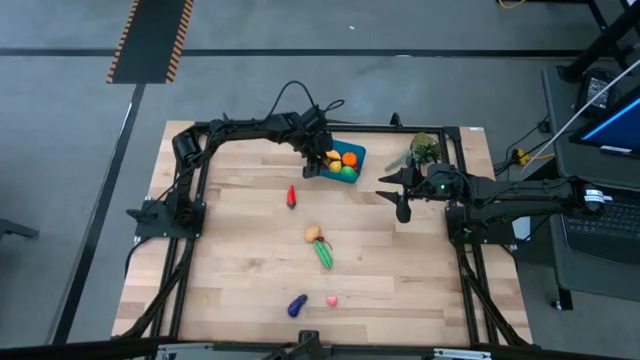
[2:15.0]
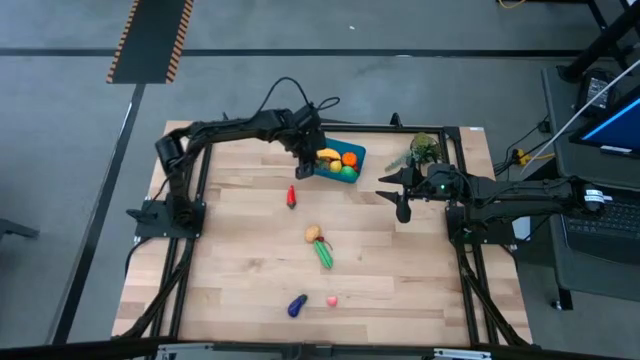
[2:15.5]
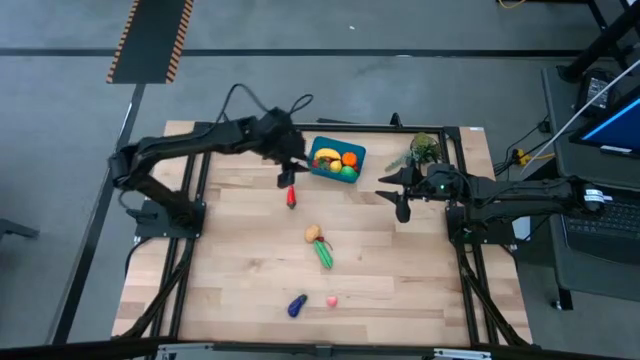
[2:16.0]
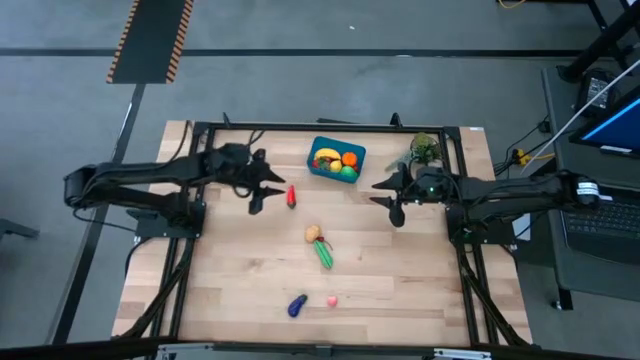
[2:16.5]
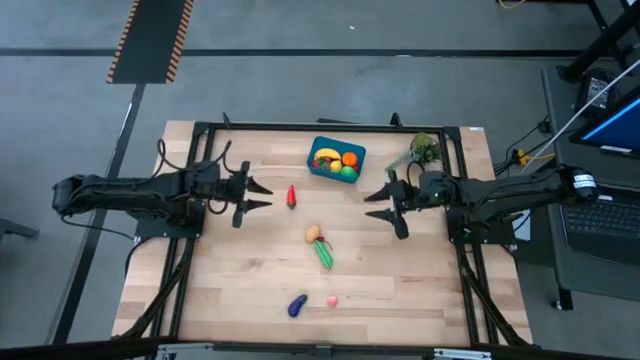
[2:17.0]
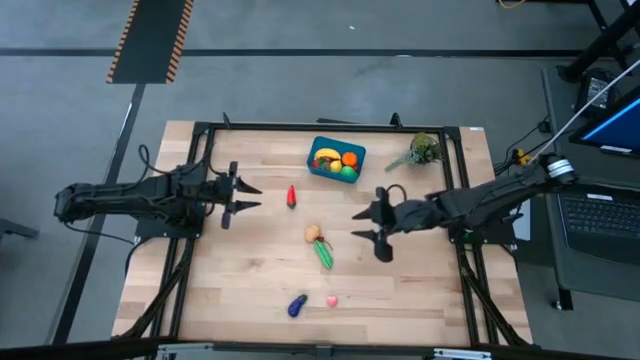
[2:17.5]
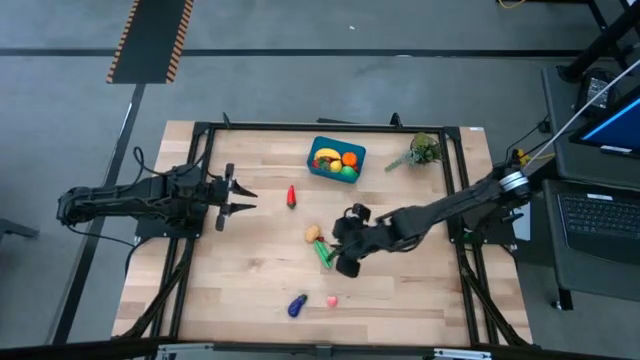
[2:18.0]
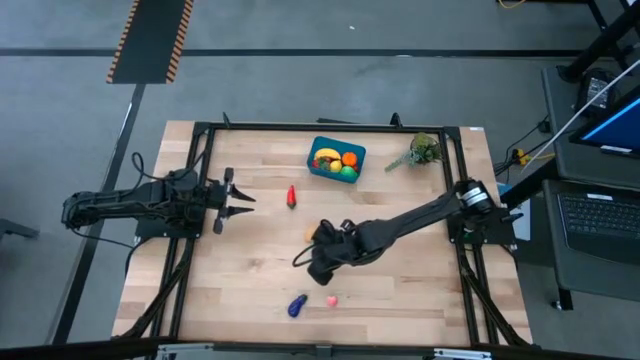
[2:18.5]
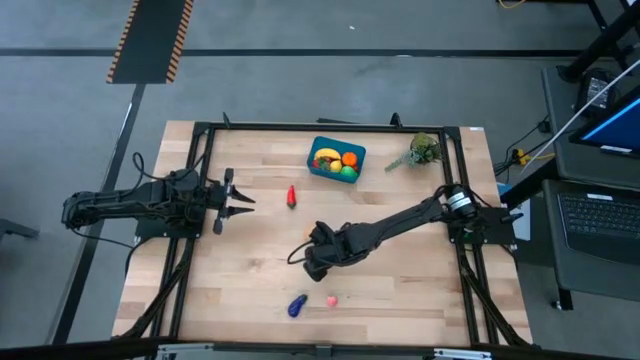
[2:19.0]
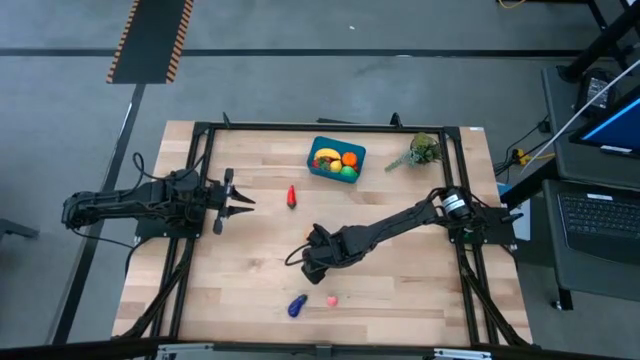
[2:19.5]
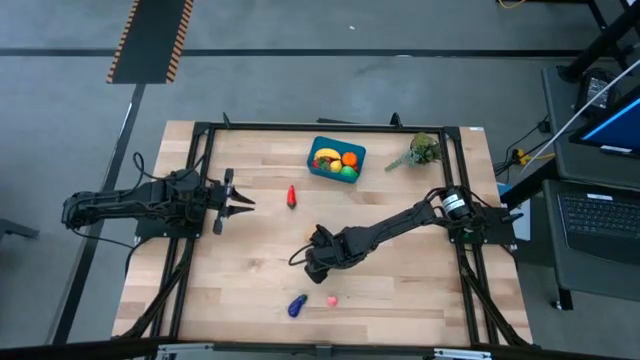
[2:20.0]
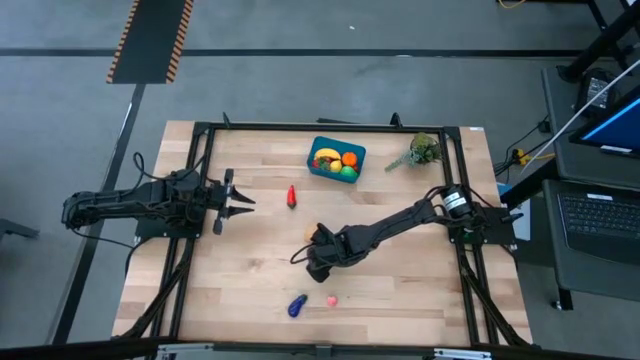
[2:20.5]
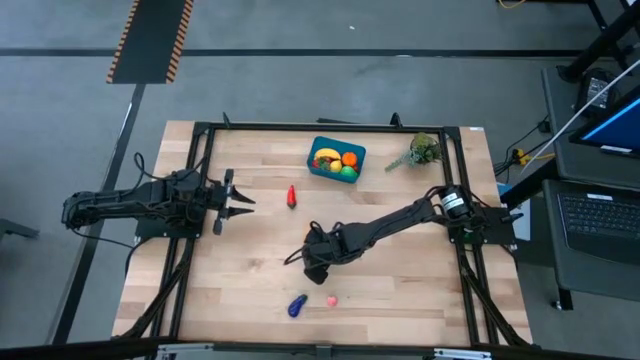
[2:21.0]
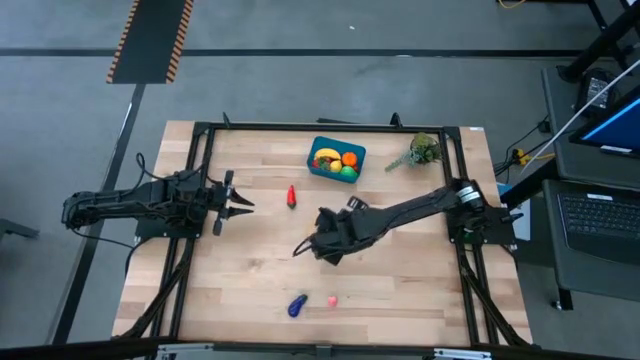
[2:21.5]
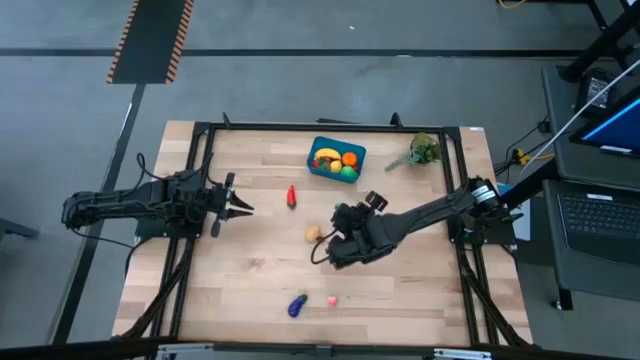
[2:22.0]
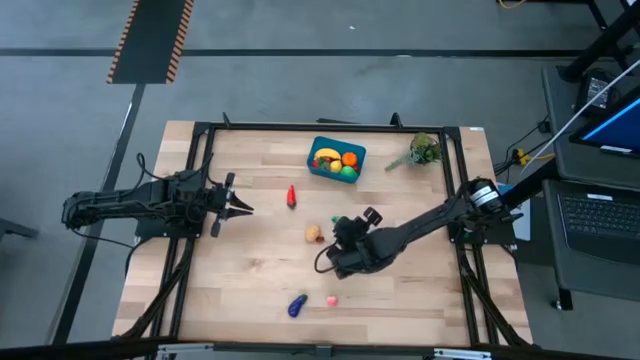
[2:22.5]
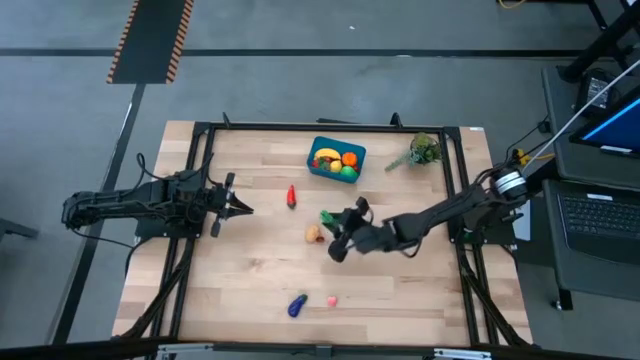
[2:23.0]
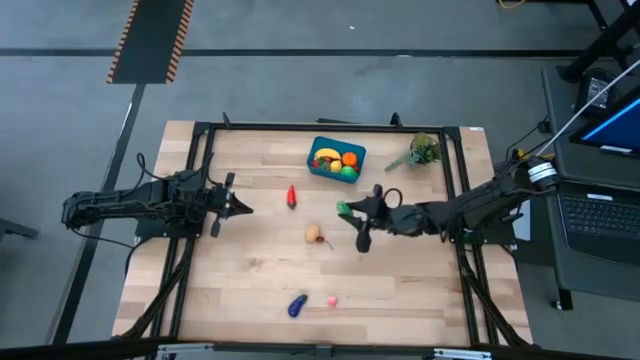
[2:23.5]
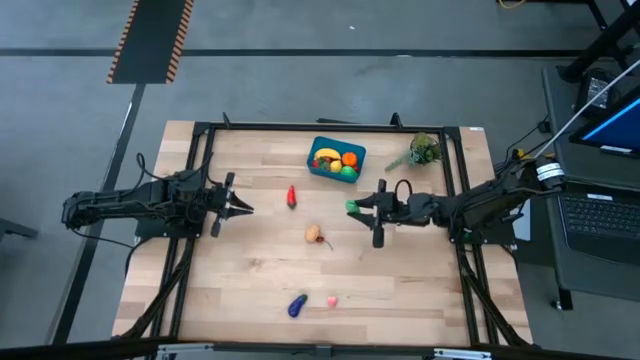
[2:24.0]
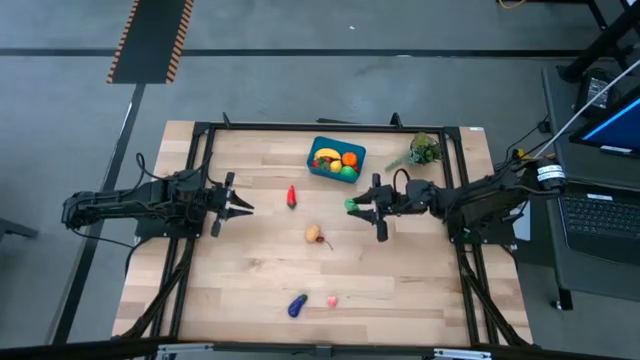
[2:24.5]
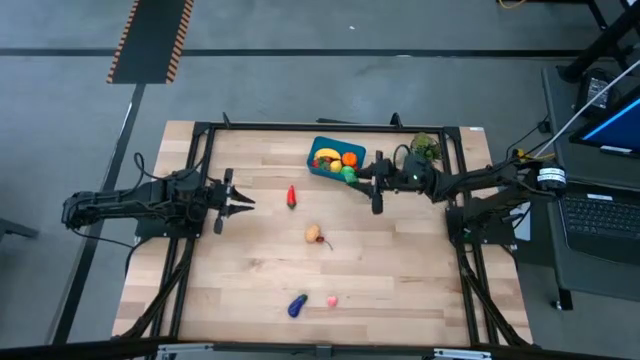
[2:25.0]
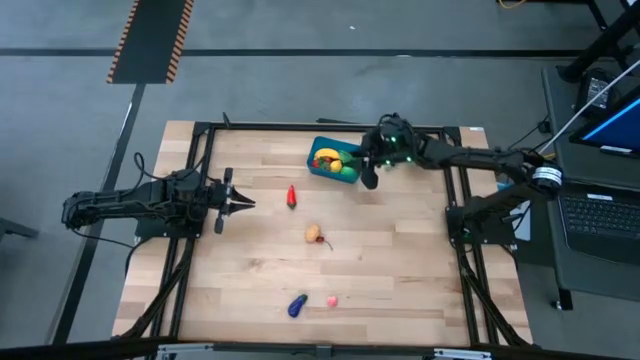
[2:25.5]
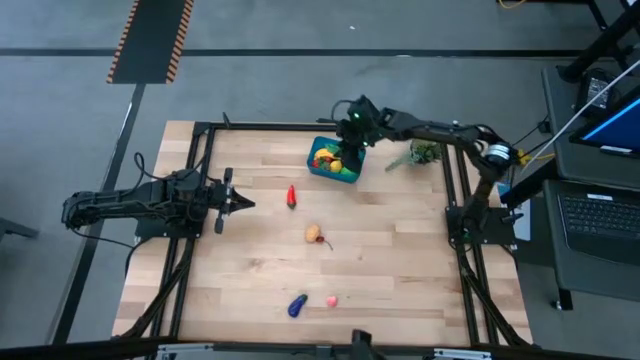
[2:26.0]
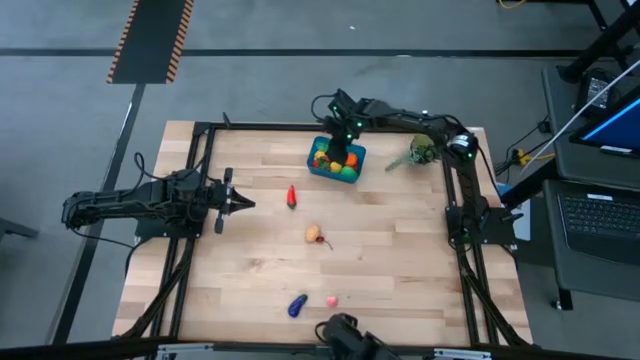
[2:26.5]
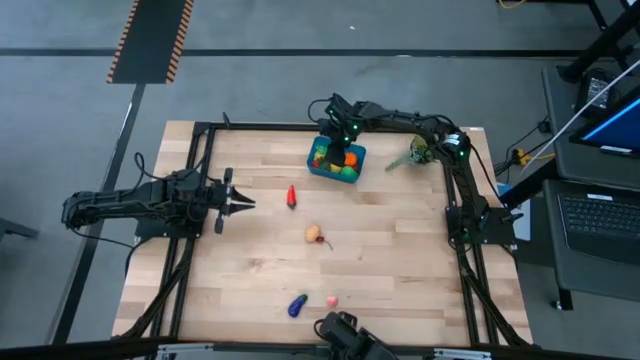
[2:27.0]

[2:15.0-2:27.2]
Task: Pick and placing Produce into tupperware
Put the green peas into the blue bin

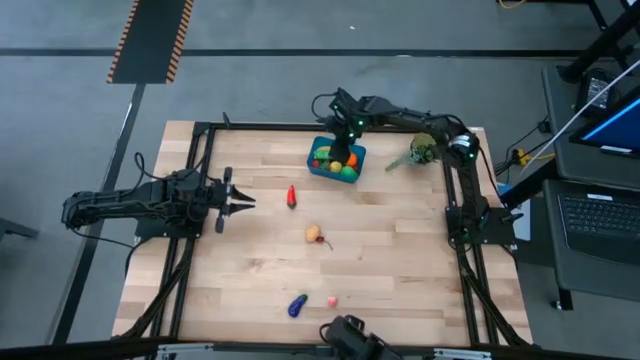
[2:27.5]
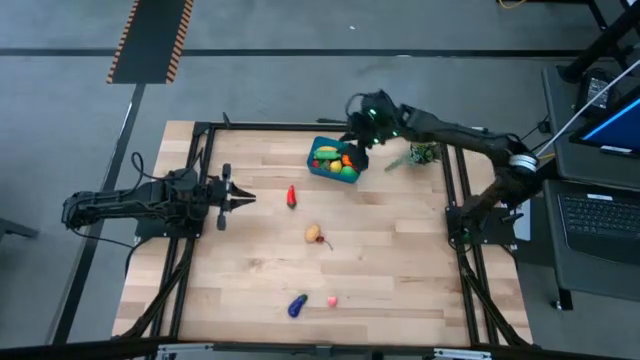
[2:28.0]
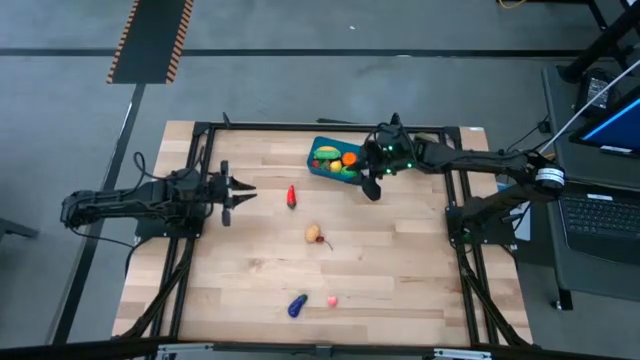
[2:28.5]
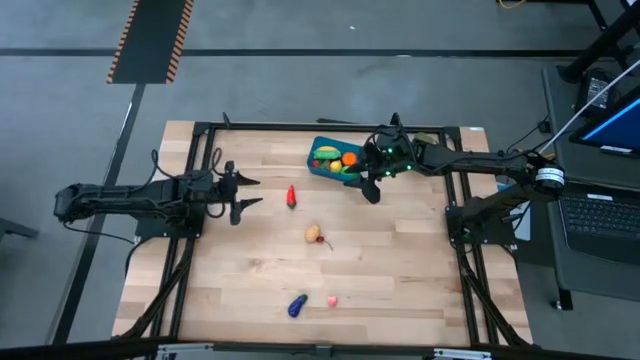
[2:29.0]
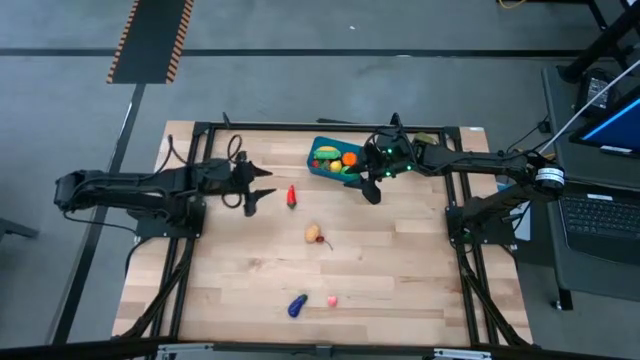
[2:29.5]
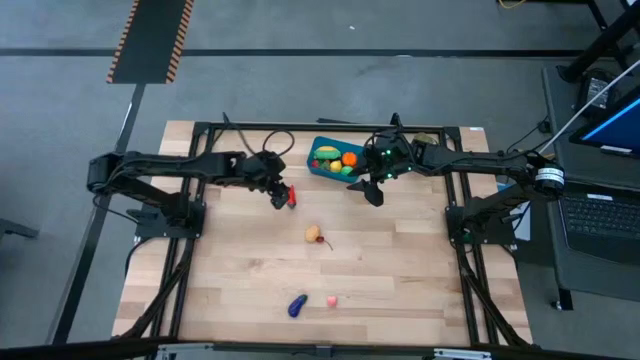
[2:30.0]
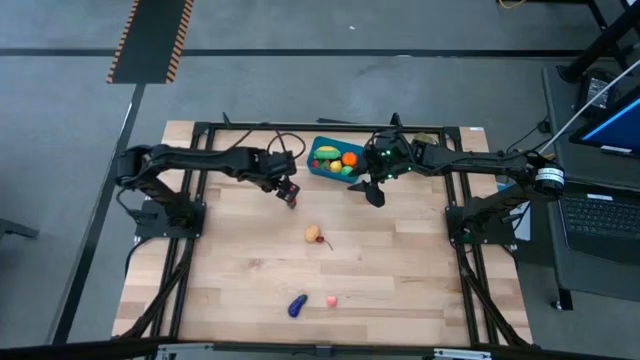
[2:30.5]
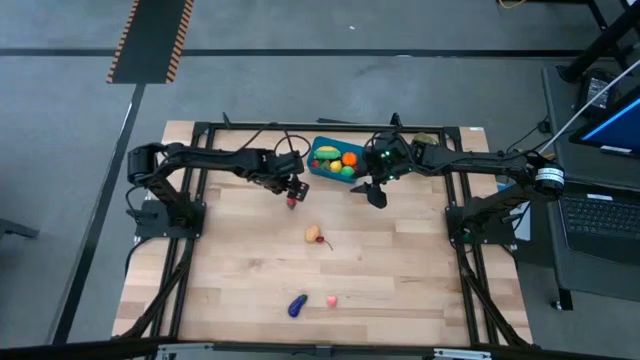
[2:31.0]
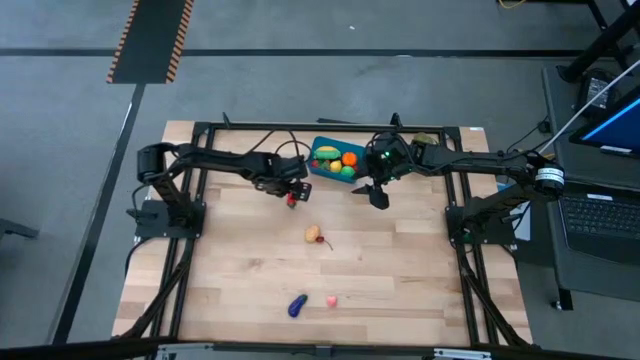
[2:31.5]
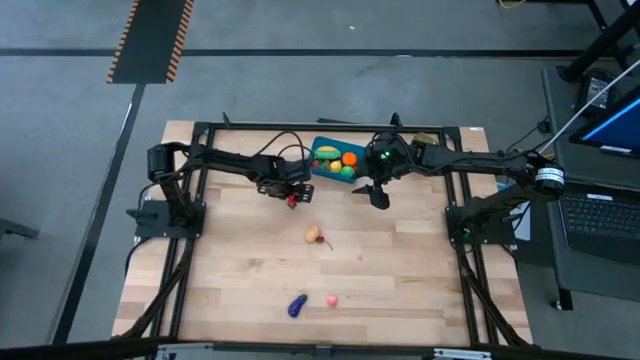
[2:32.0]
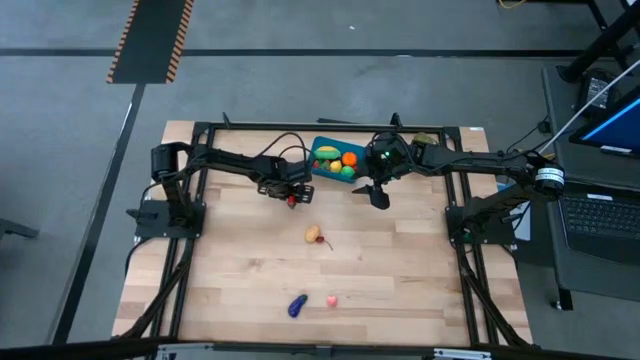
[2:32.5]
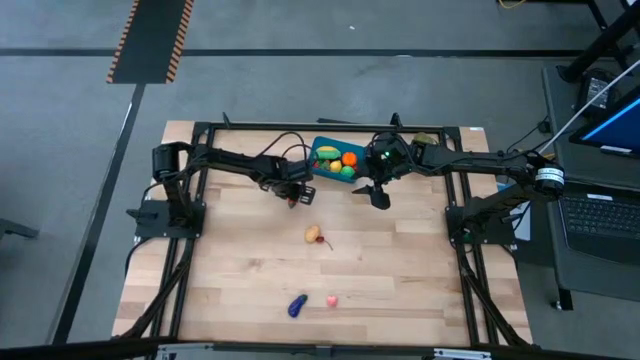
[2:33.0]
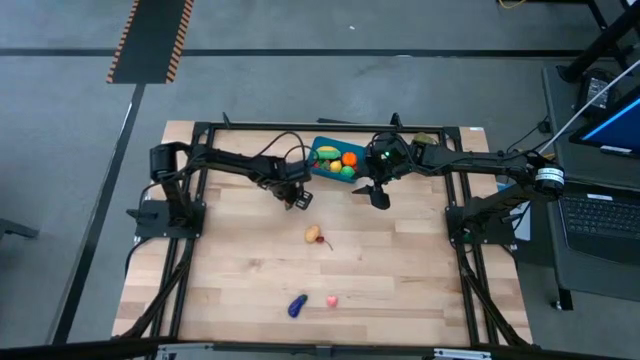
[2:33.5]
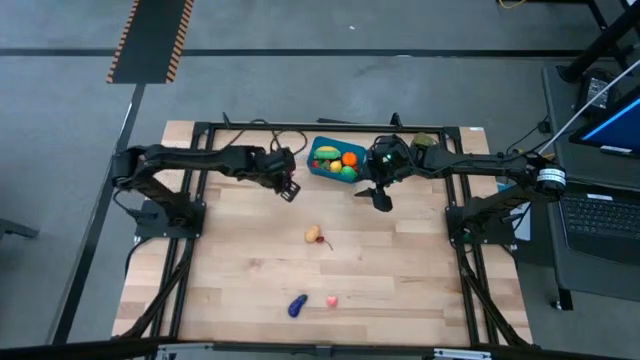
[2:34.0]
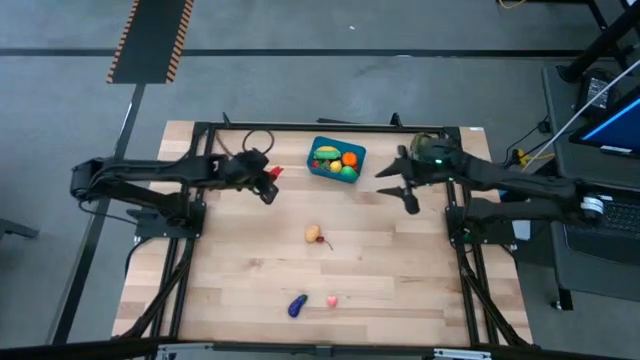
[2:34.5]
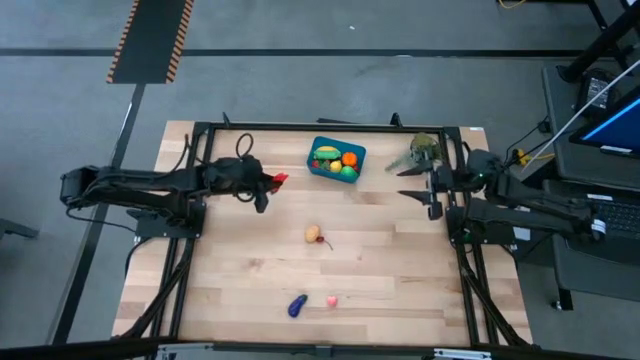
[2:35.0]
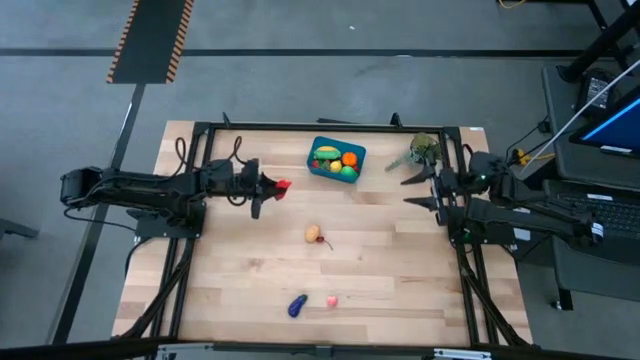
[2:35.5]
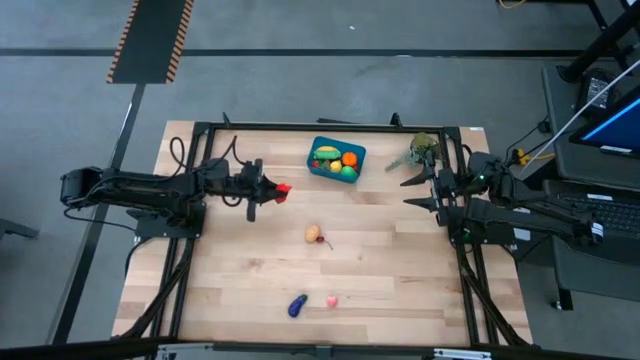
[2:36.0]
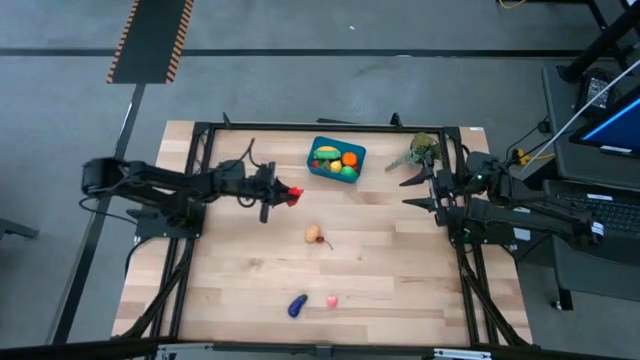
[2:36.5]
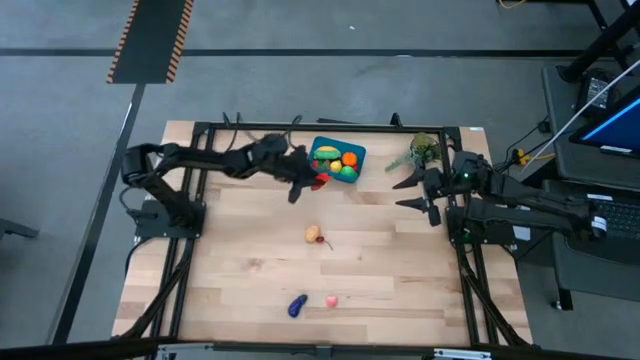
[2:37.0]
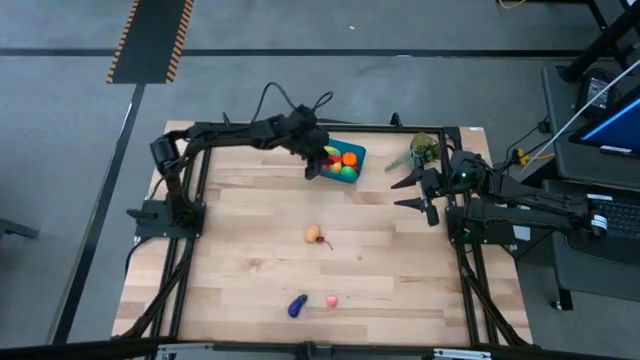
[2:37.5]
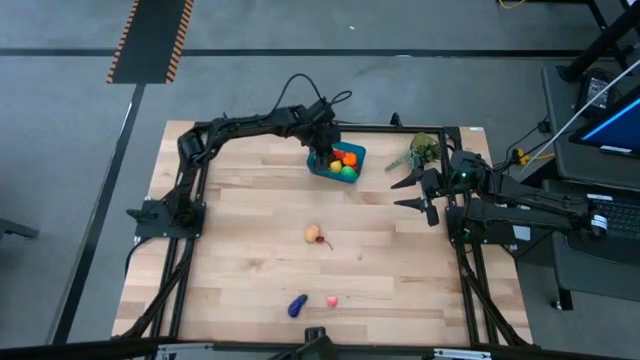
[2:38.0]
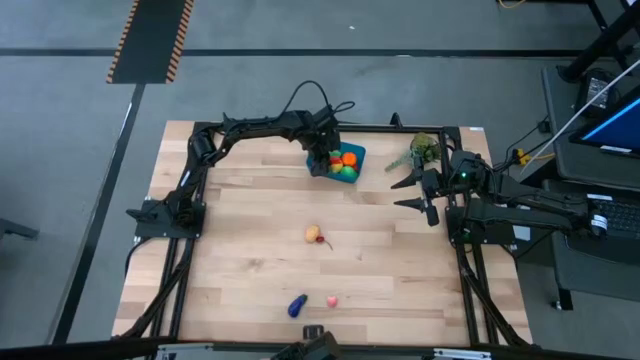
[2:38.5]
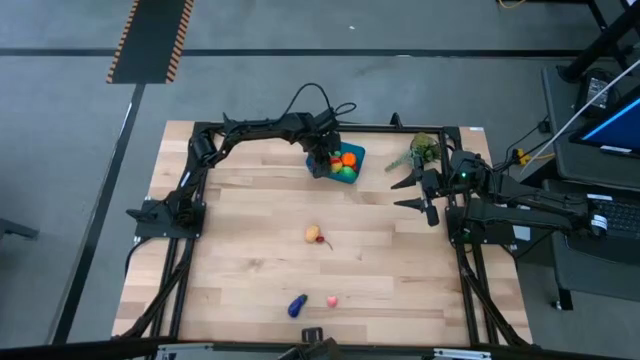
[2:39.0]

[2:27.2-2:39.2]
Put the red chili pepper into the blue bin
